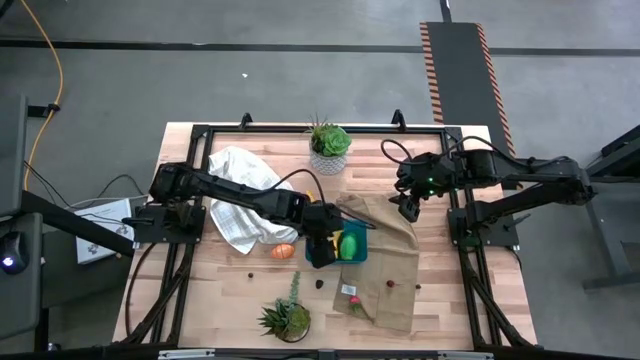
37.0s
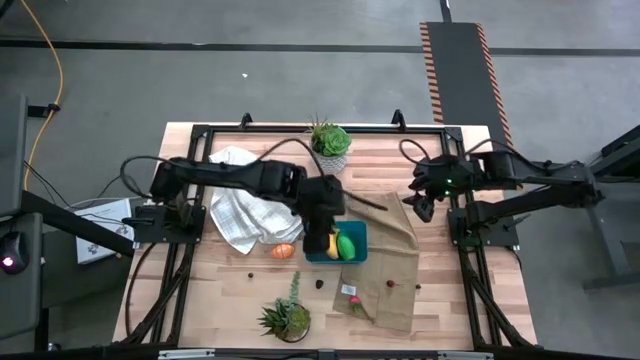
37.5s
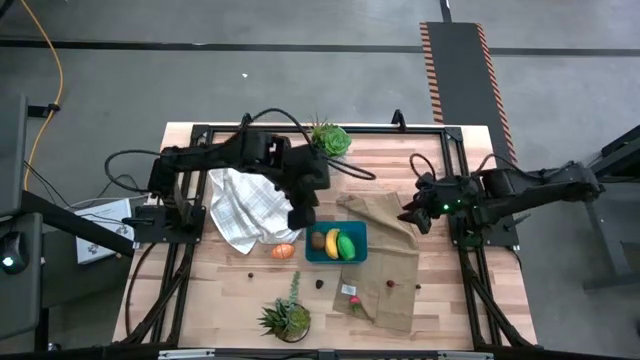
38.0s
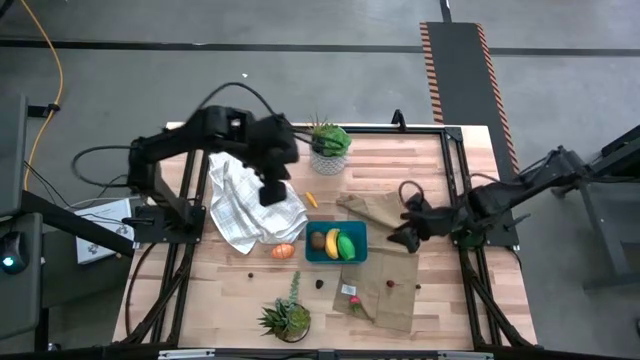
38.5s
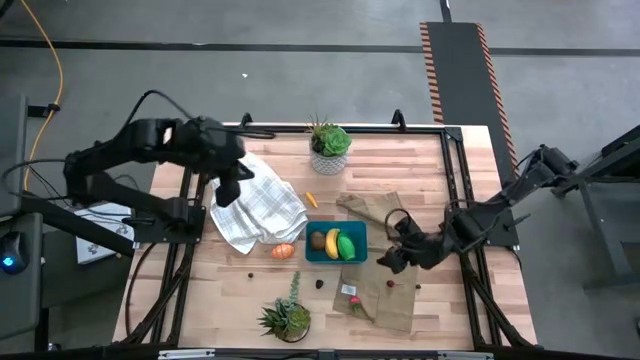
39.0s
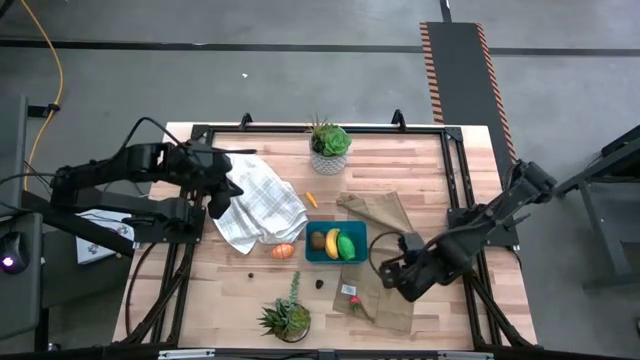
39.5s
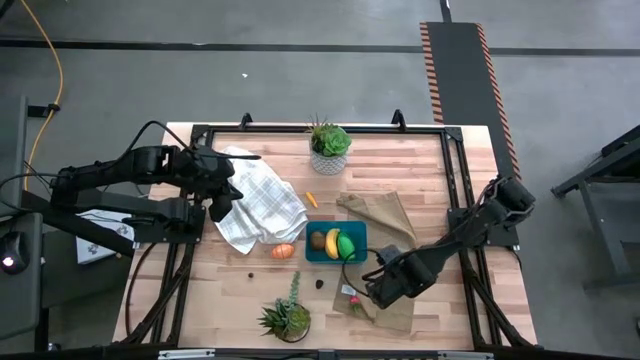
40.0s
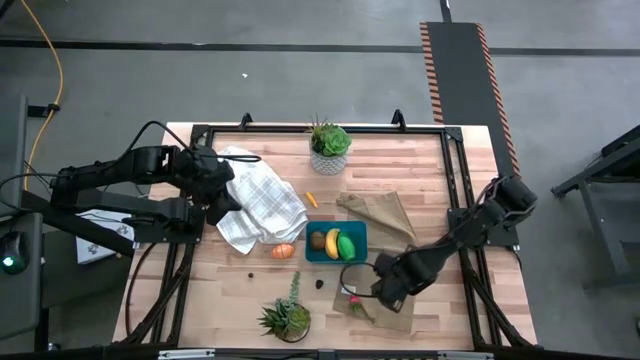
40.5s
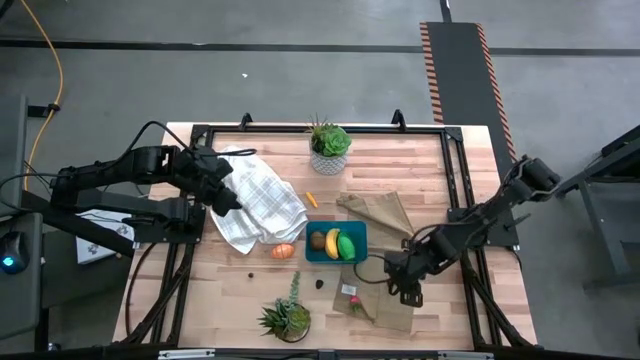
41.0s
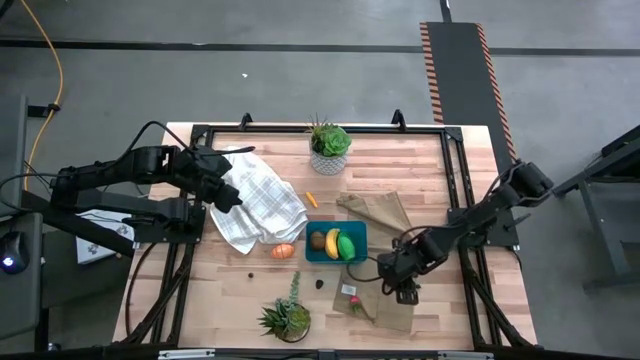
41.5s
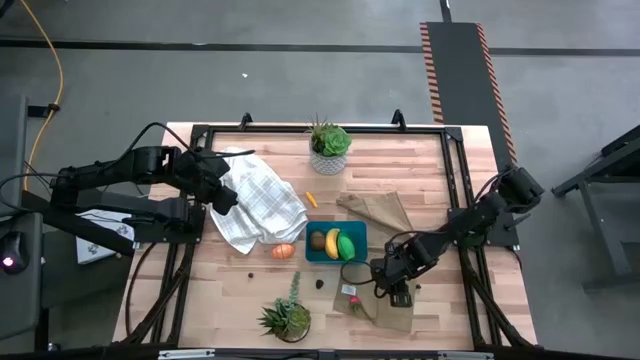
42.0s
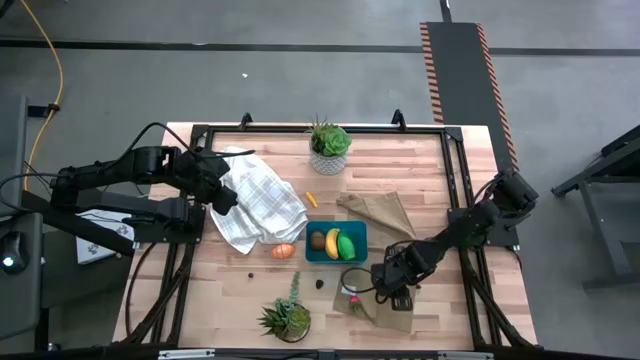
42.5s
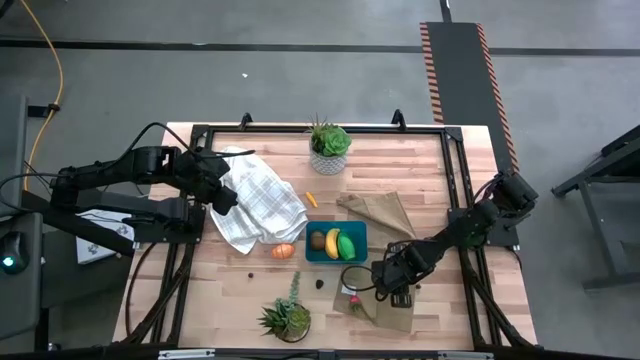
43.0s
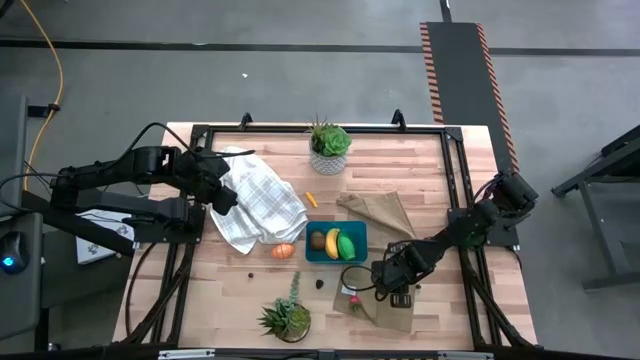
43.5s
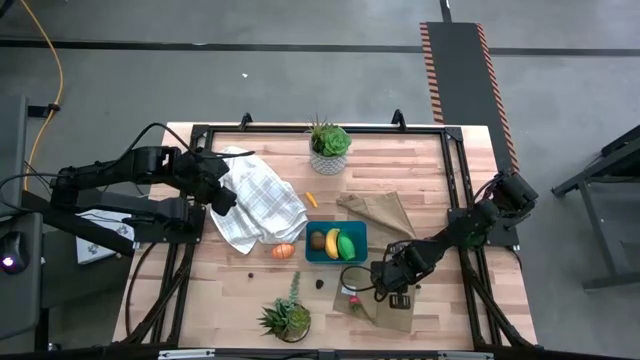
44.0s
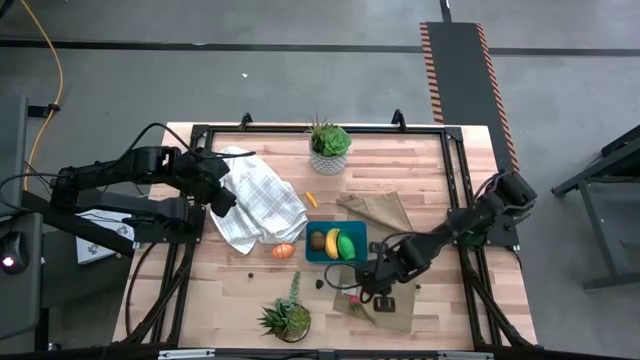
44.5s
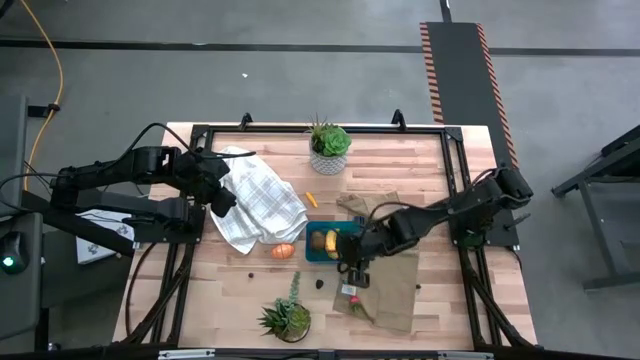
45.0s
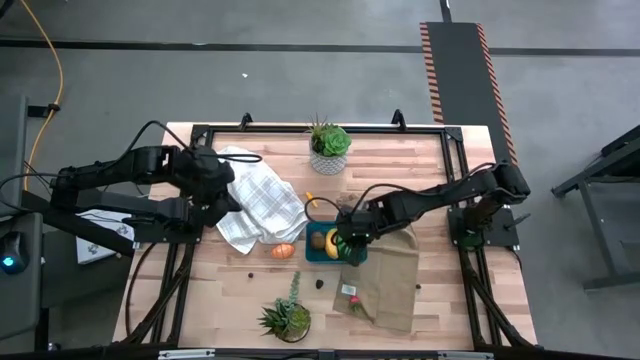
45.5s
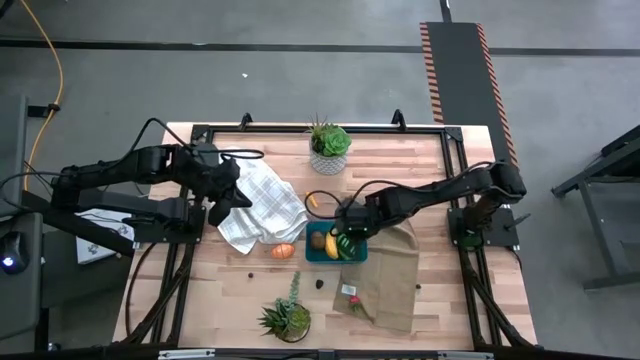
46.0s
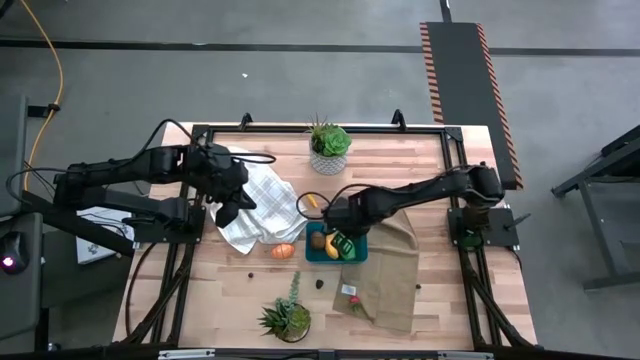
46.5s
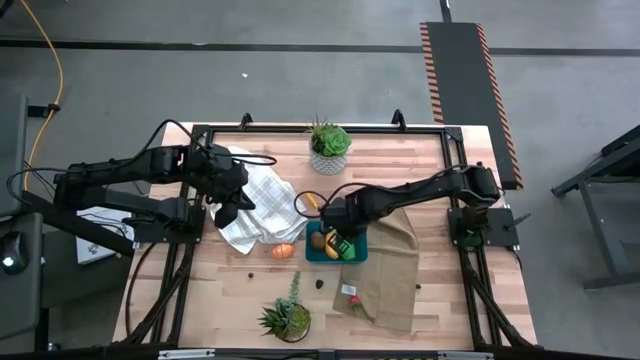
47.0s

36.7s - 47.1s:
Task: Pick and placing Produce into tupperware
Put the red cherry into the blue bin

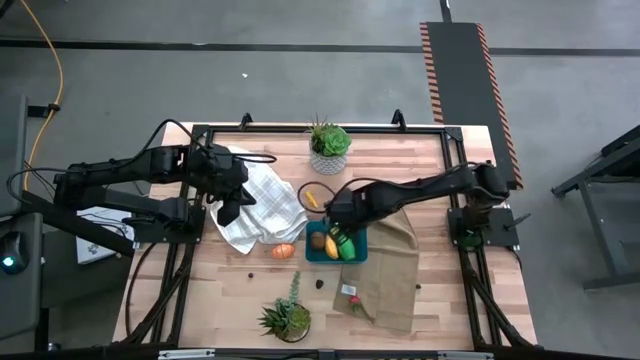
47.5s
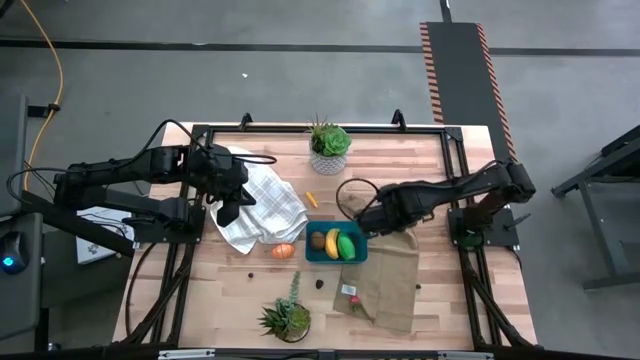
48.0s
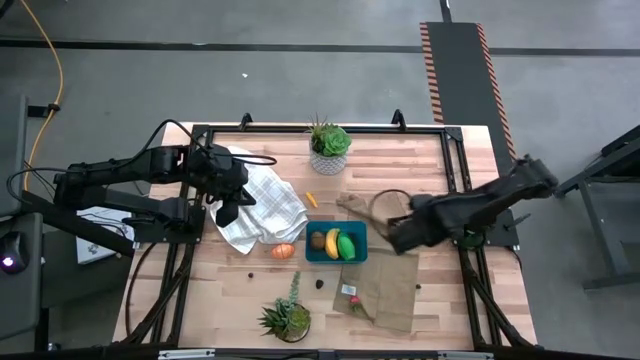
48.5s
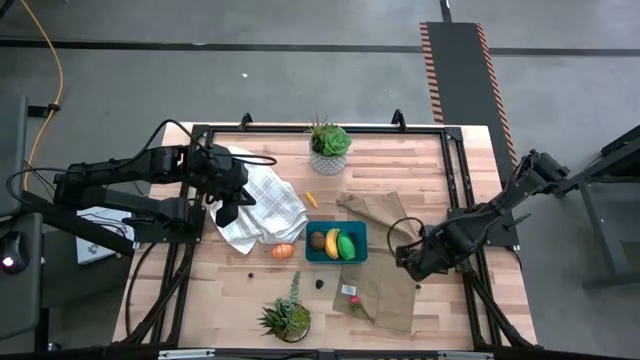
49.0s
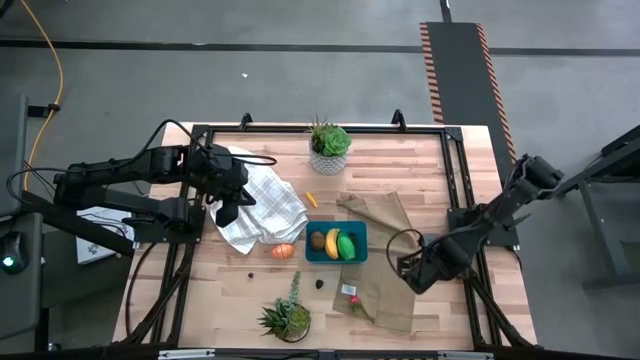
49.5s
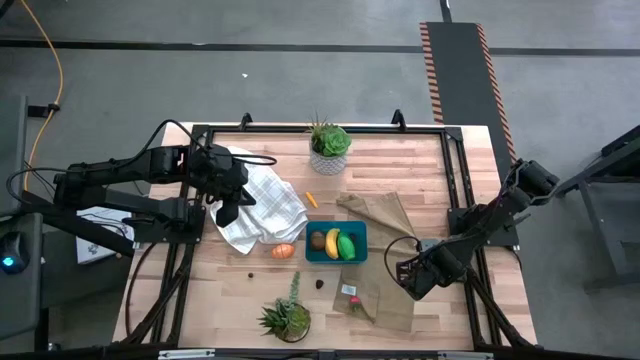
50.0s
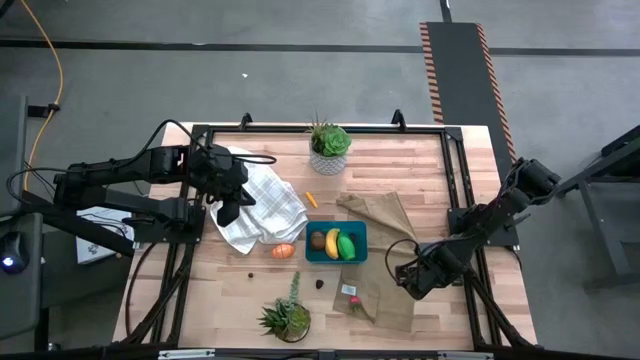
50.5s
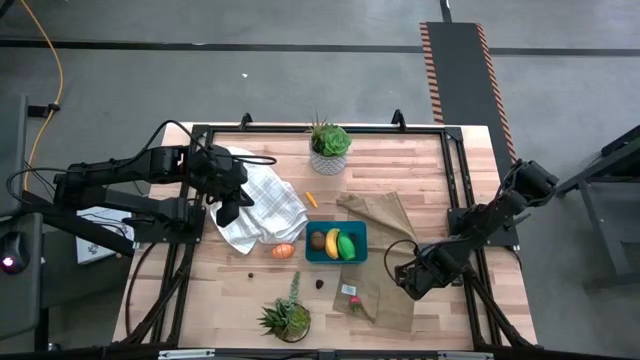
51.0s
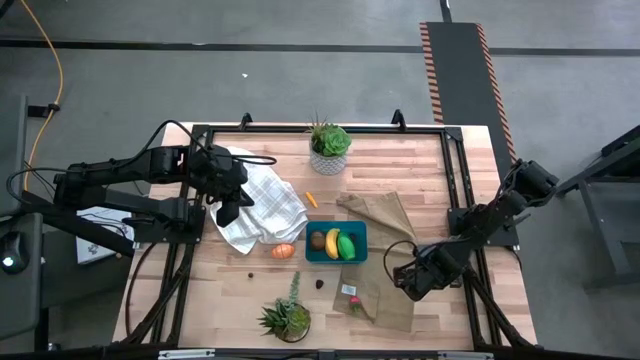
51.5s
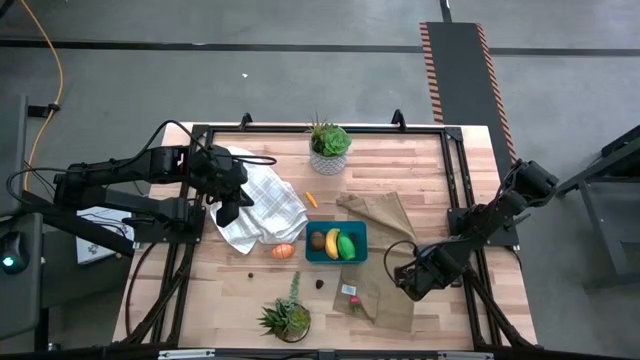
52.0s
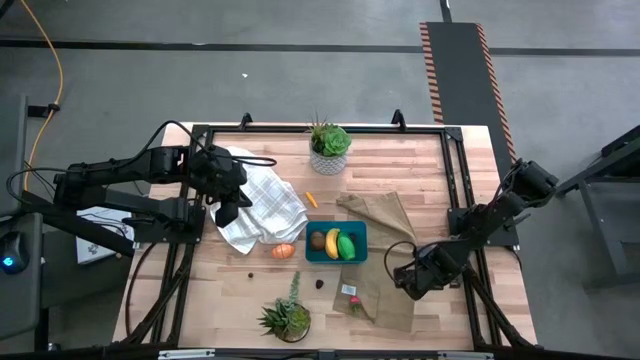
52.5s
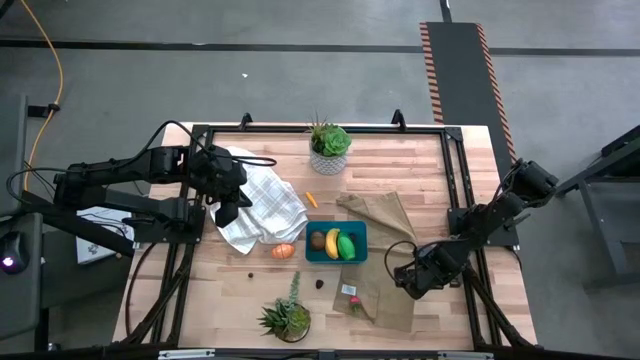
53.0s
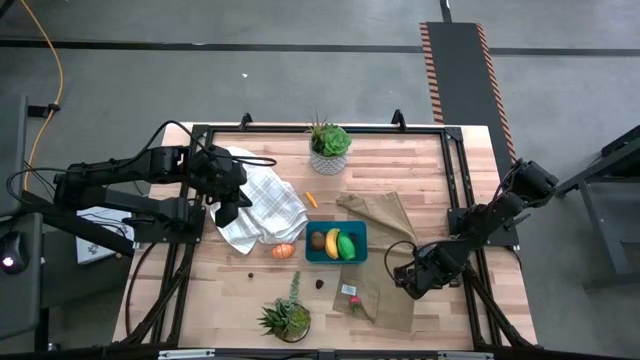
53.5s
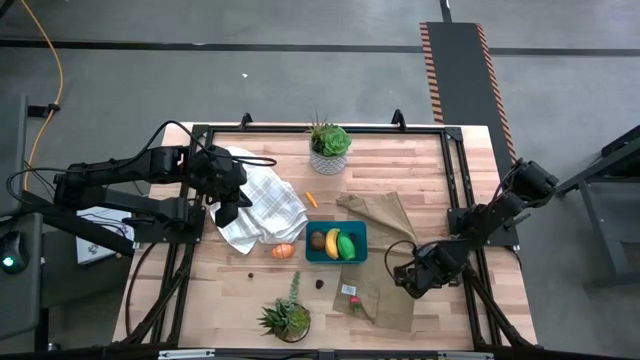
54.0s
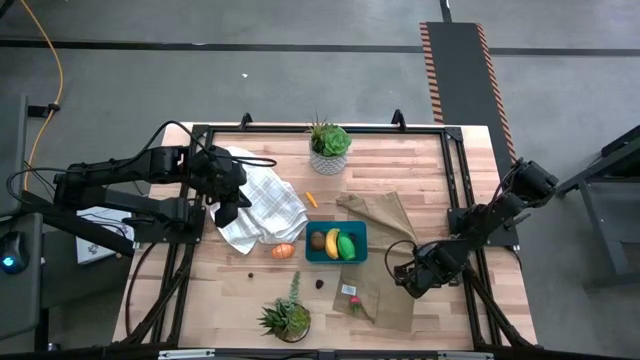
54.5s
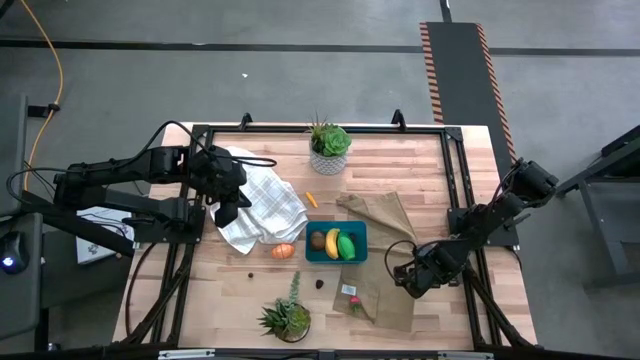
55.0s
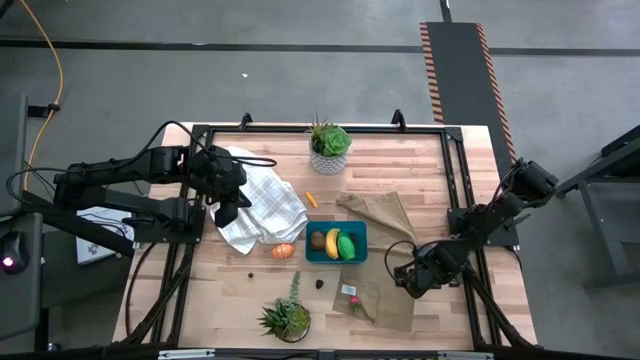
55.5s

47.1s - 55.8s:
Put the right blueberry into the blue bin

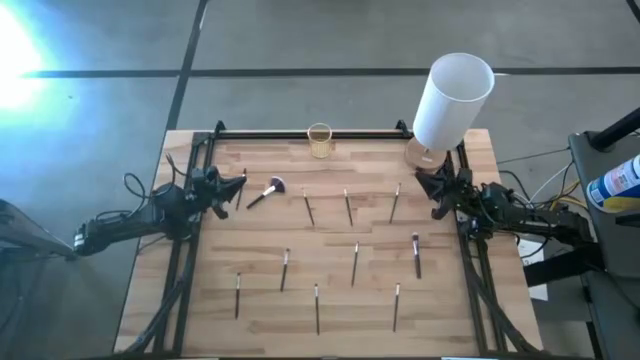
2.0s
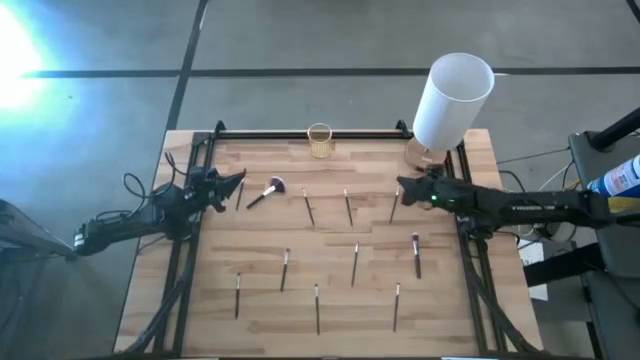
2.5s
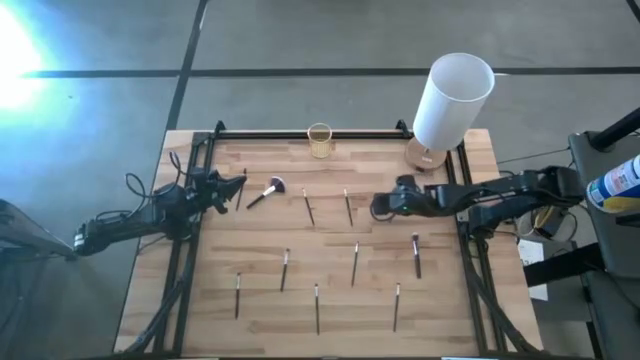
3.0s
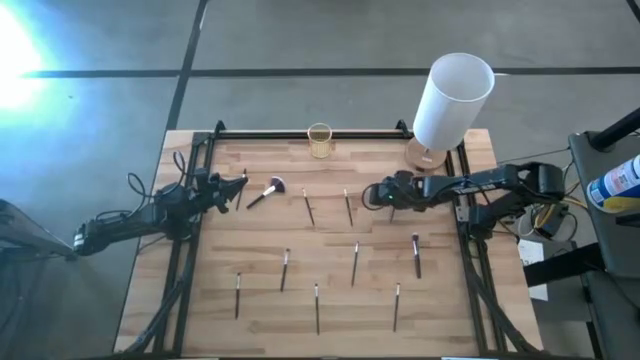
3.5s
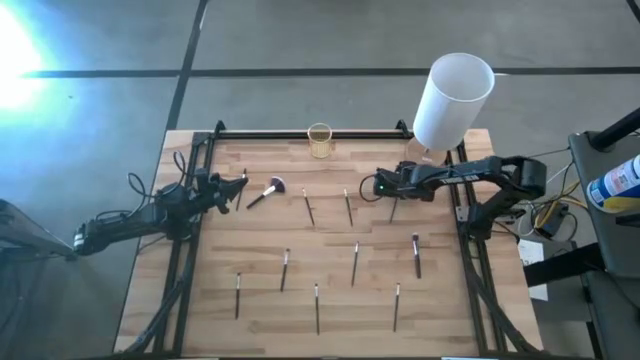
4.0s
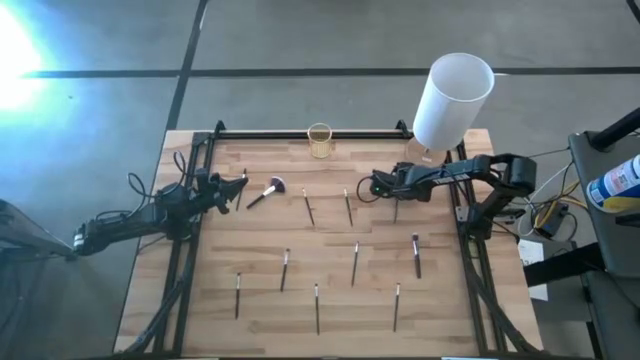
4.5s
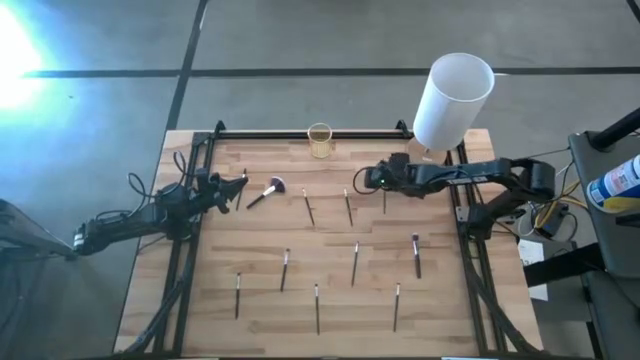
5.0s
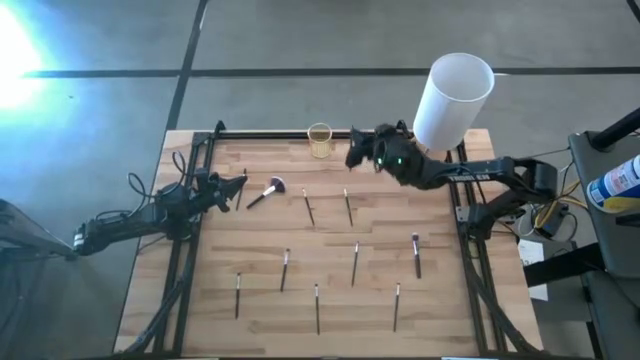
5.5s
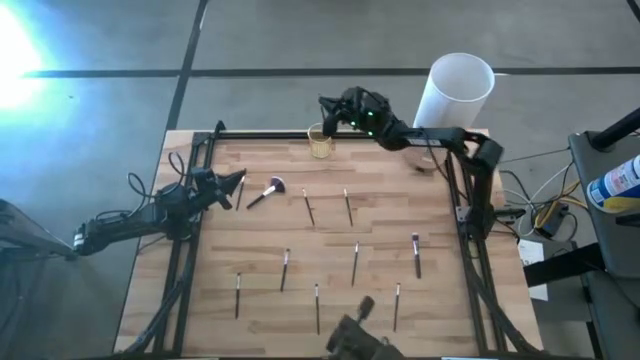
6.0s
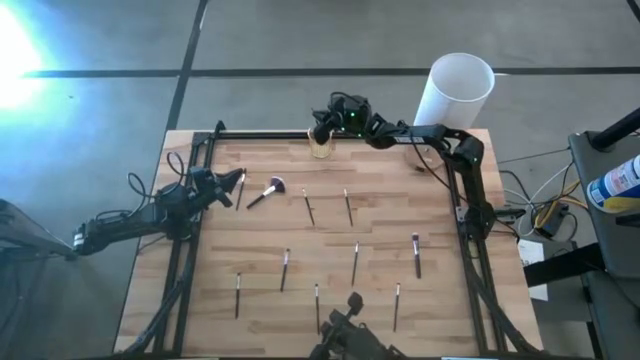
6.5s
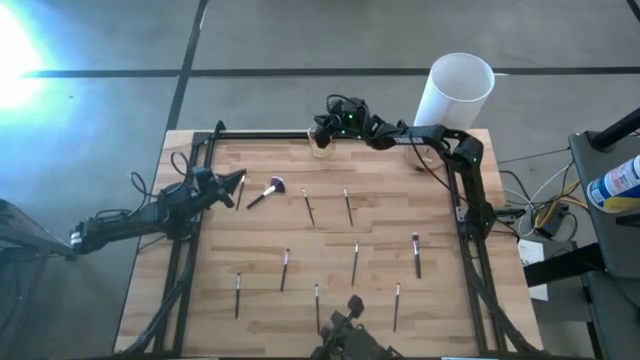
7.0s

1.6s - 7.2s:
Task: Put items in baskets/containers
Put the black eyeshadow brush into the yellow pen holder
